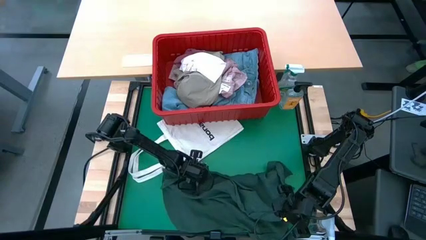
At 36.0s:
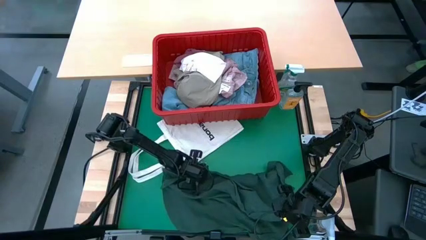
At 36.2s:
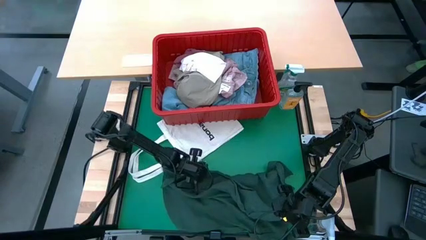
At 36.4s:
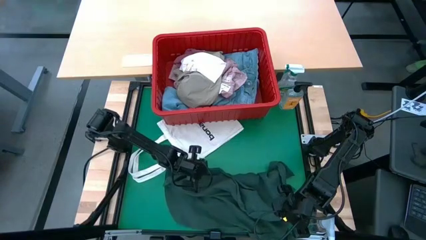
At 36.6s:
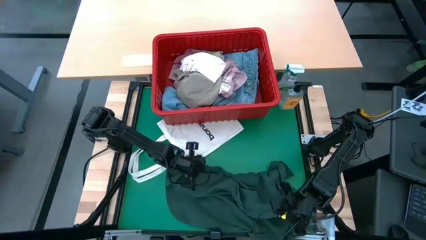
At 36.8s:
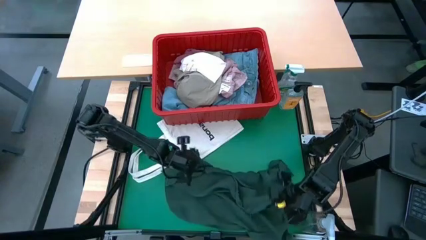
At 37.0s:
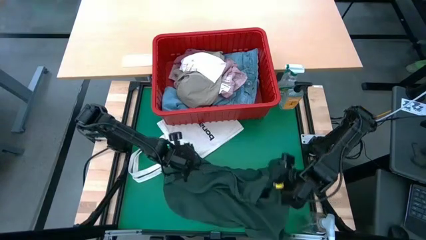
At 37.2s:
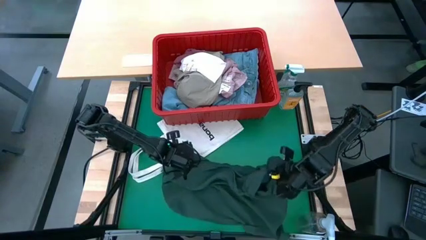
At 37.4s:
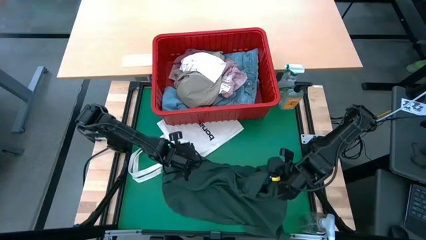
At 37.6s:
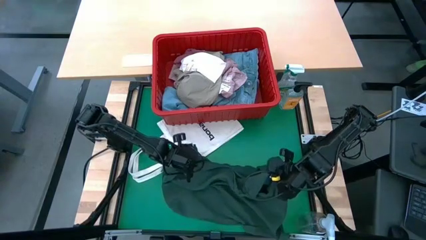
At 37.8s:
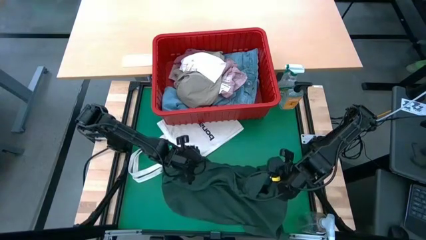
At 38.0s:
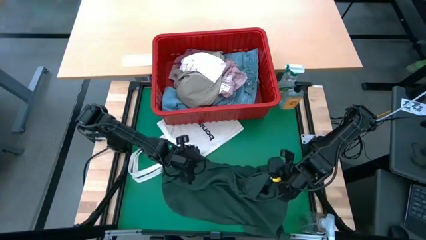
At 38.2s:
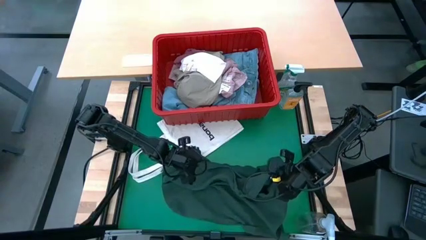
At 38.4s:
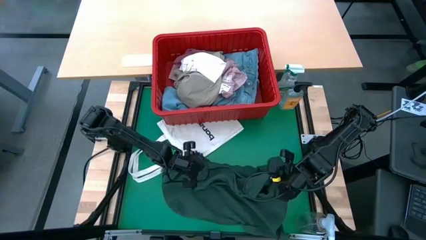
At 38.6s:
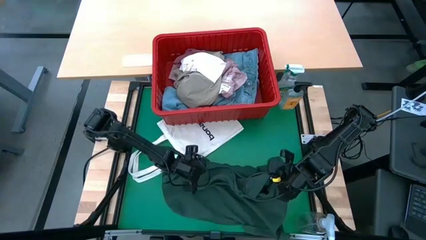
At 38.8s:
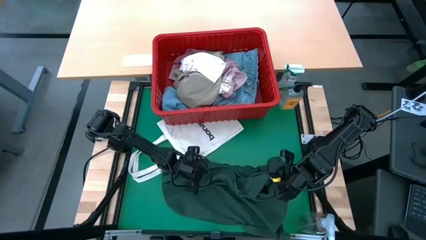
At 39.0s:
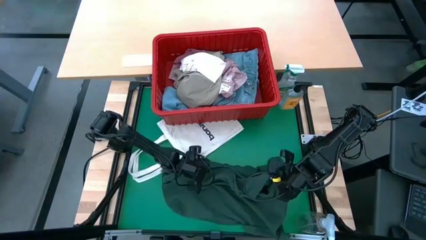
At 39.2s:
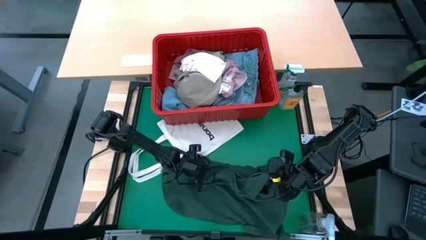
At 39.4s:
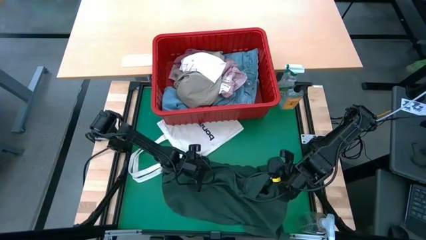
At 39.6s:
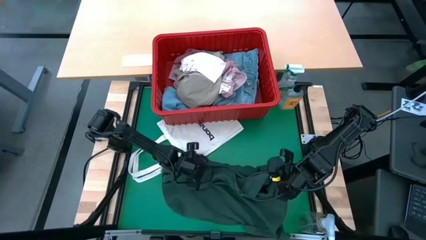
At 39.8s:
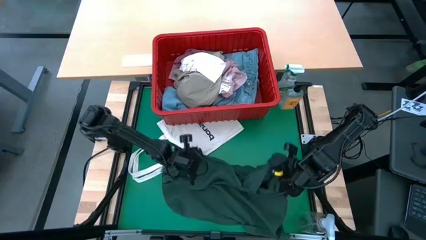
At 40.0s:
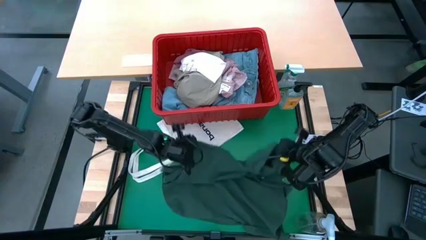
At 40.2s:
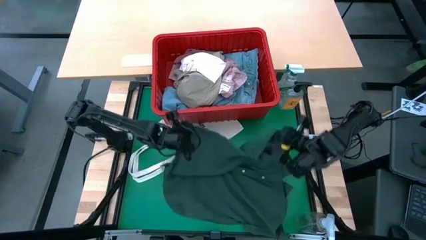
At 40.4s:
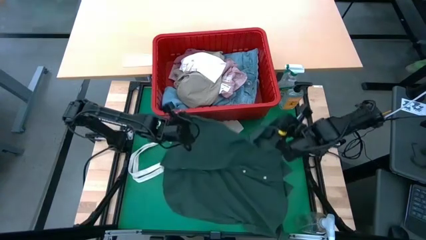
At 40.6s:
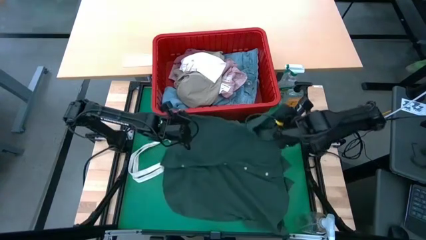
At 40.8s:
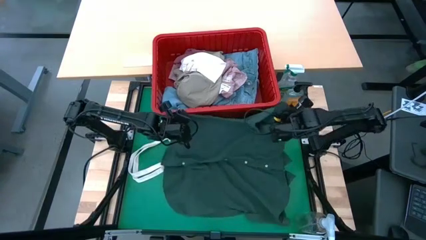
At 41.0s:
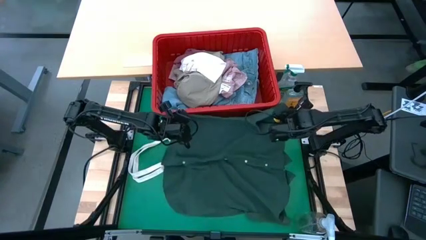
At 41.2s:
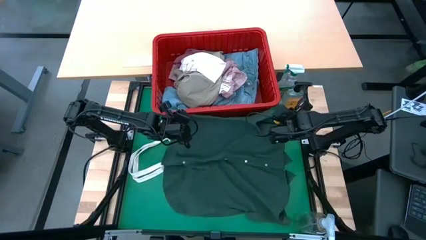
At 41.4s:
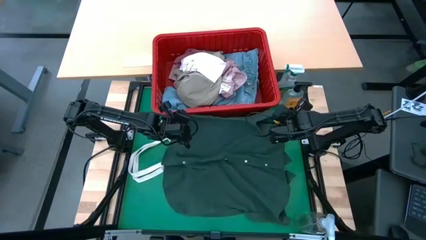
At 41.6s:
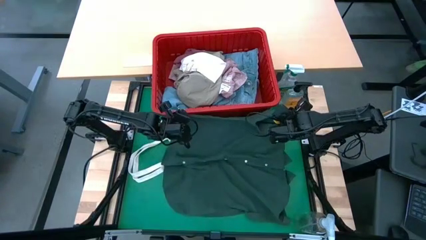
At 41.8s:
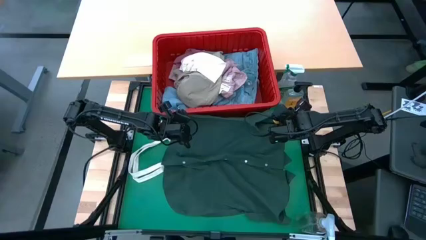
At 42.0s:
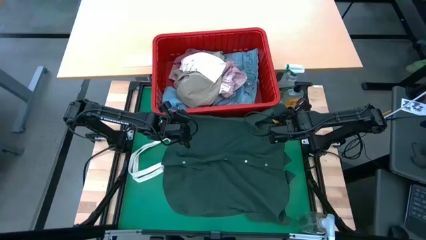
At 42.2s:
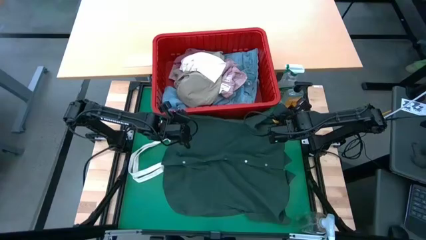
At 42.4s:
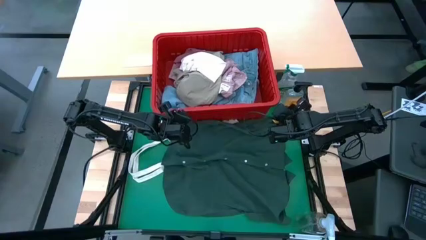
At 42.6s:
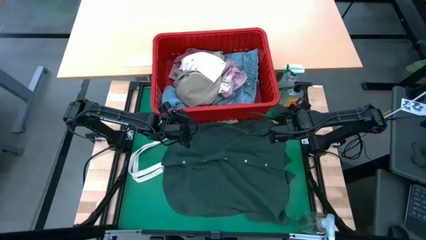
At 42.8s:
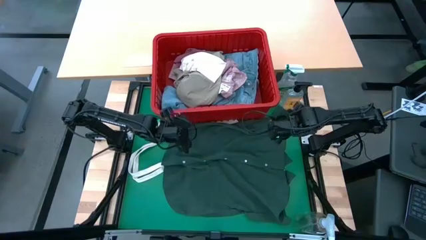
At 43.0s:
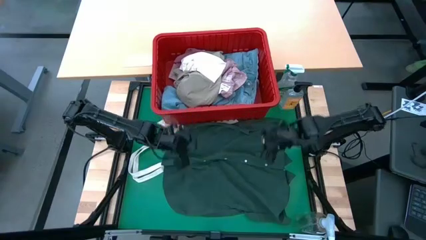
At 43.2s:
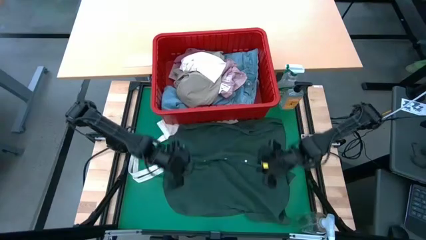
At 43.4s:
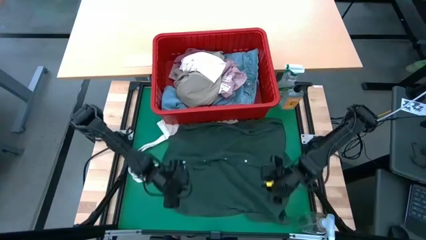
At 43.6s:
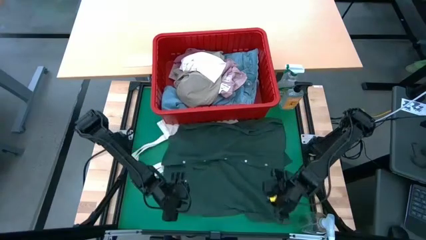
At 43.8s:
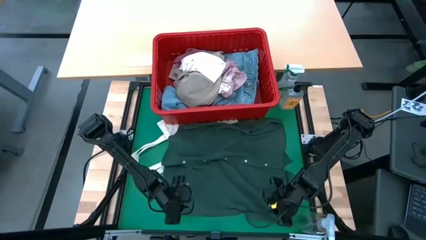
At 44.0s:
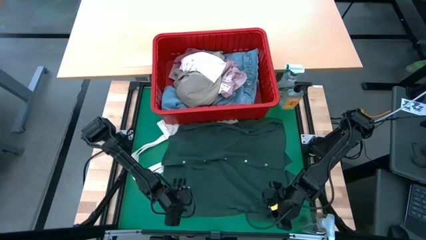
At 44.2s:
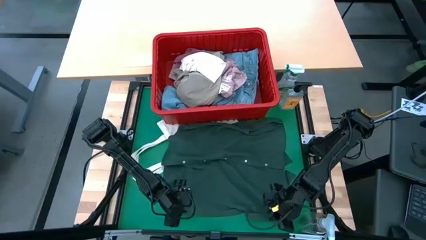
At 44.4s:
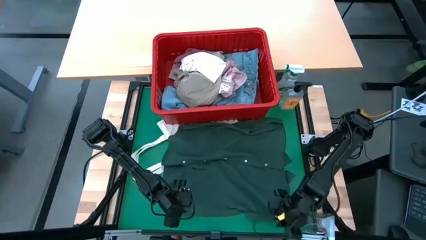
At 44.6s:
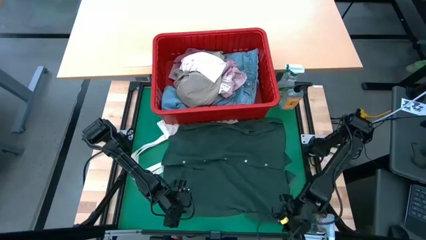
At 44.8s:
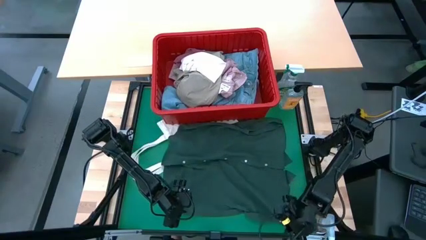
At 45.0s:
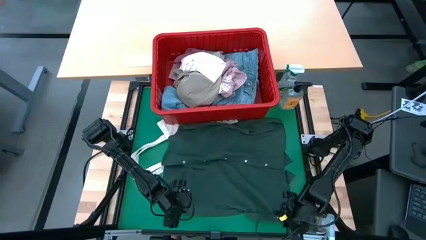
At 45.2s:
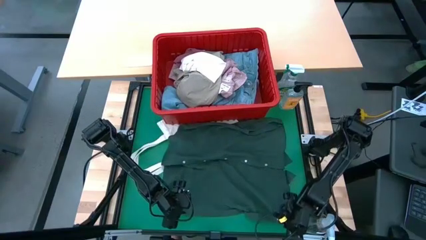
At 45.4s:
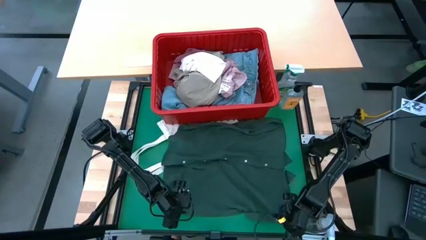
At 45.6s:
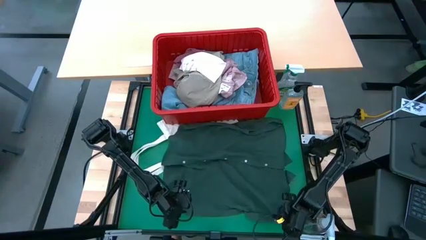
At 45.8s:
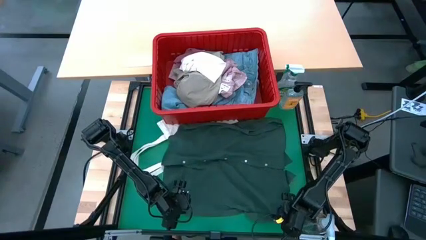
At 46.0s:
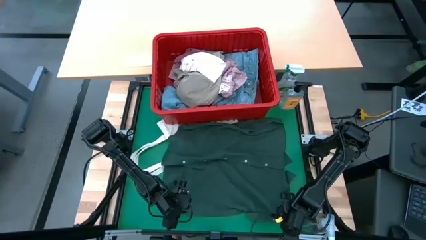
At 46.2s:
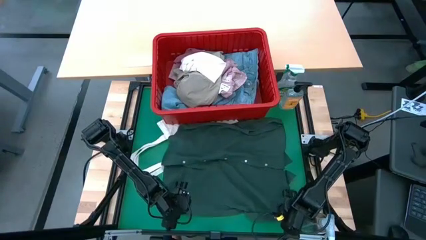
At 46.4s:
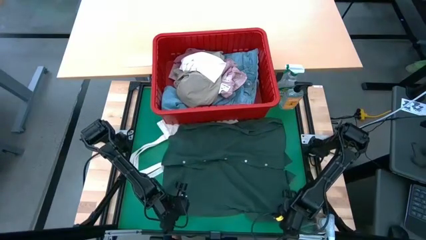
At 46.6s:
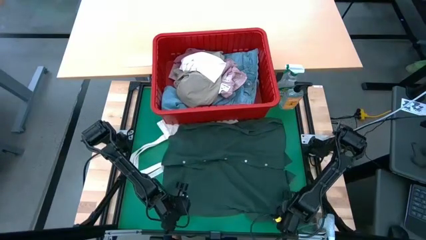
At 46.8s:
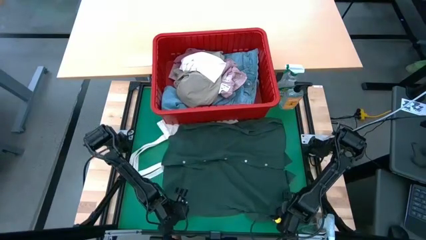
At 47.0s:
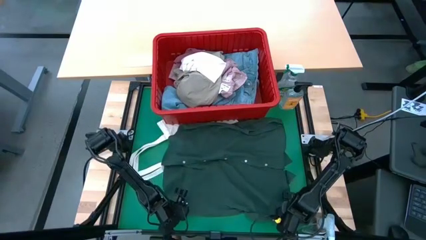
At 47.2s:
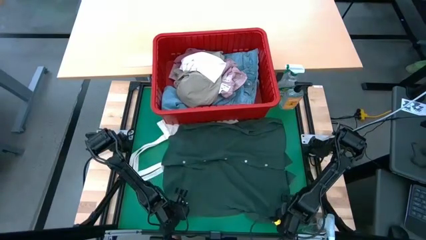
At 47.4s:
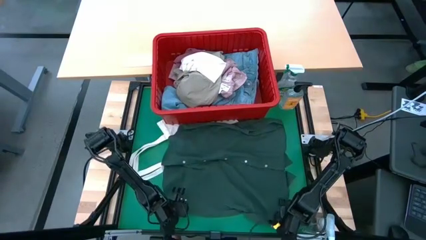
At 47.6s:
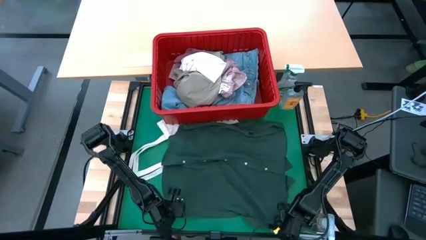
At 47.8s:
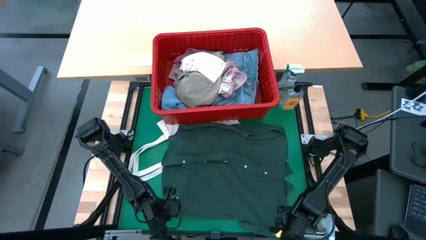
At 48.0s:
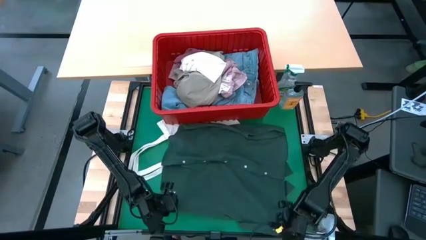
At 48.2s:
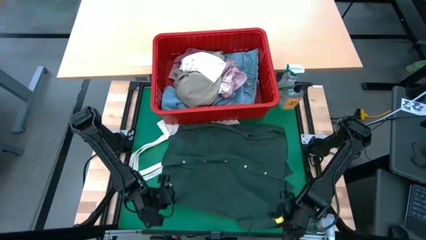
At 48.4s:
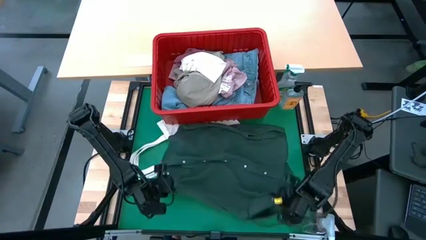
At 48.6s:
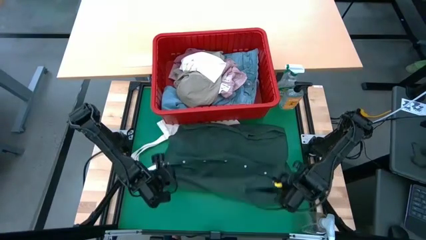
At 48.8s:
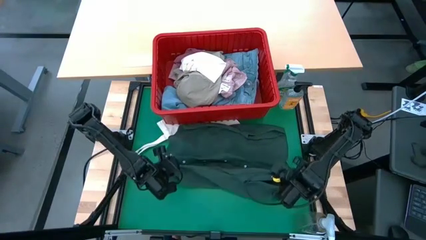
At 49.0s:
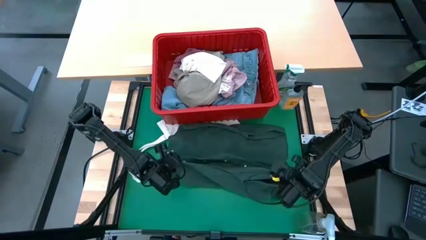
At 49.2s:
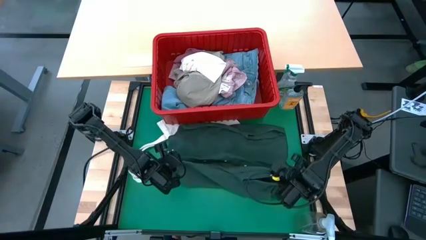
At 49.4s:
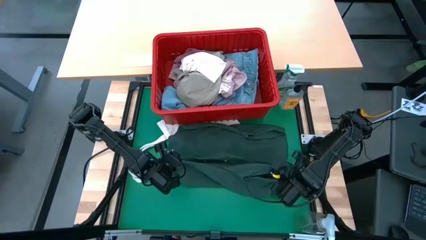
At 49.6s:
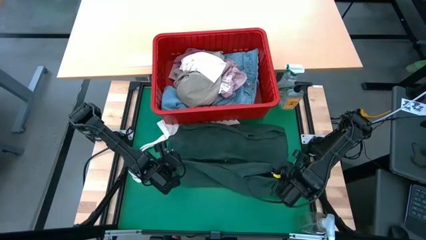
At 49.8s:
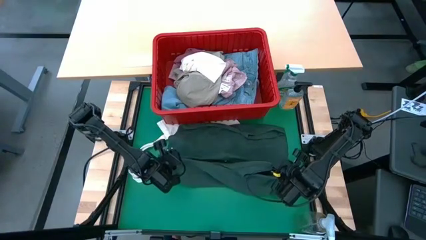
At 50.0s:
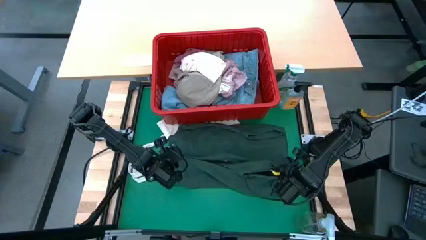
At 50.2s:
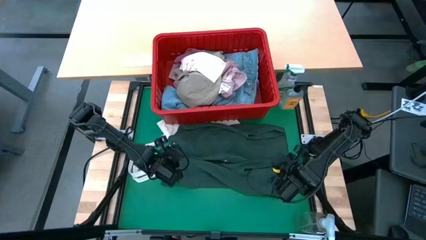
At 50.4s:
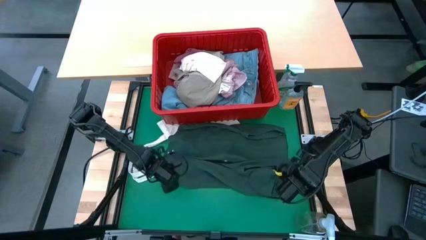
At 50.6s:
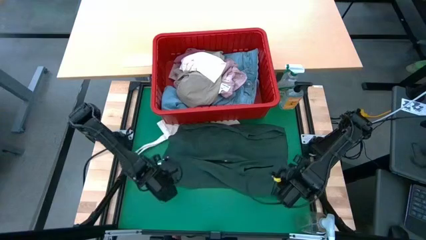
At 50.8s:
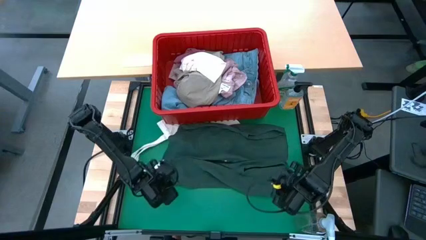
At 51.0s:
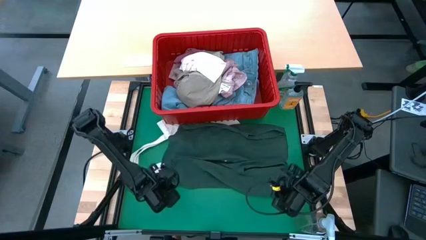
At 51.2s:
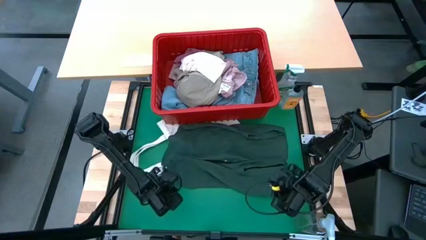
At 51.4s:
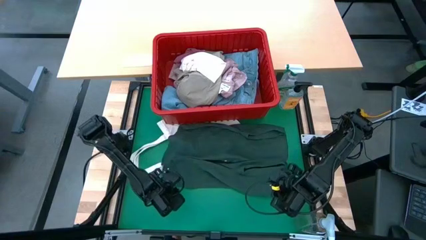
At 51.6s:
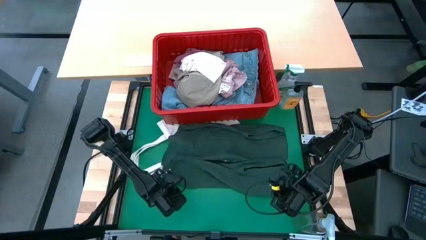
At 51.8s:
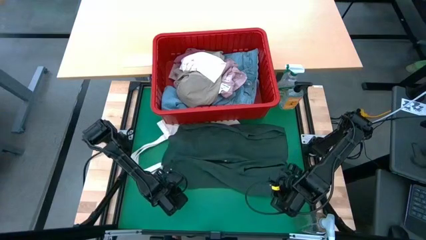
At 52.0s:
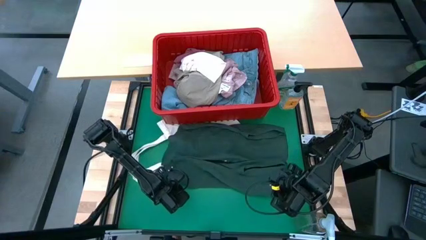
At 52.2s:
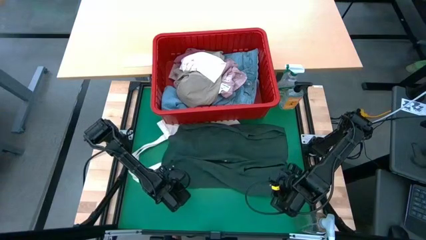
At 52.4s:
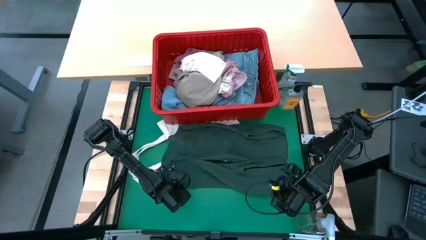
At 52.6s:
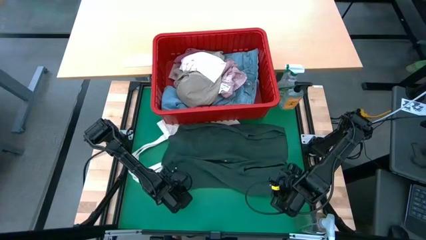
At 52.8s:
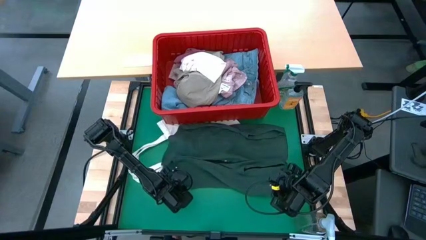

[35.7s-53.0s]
Task: Fold laundry
Fold the green shirt
